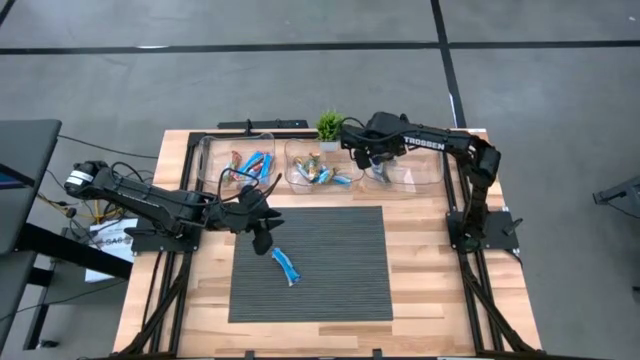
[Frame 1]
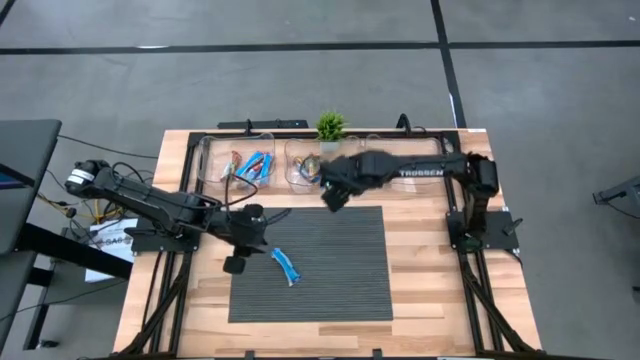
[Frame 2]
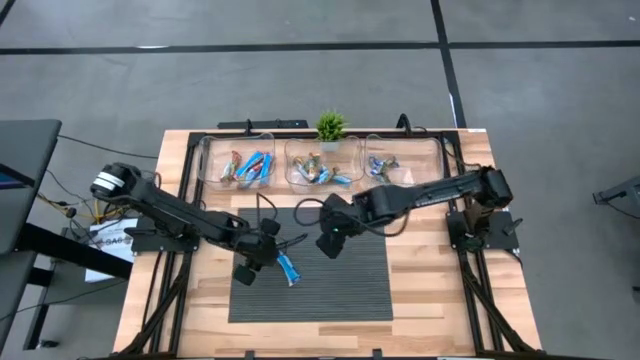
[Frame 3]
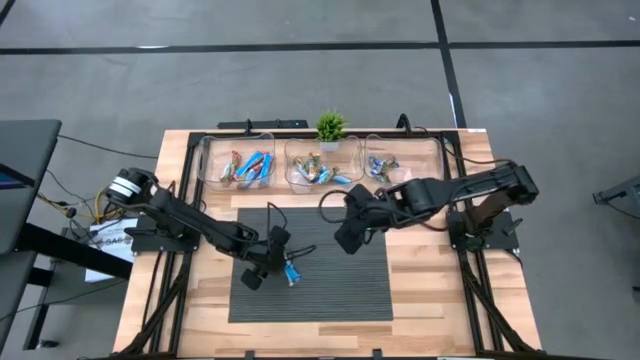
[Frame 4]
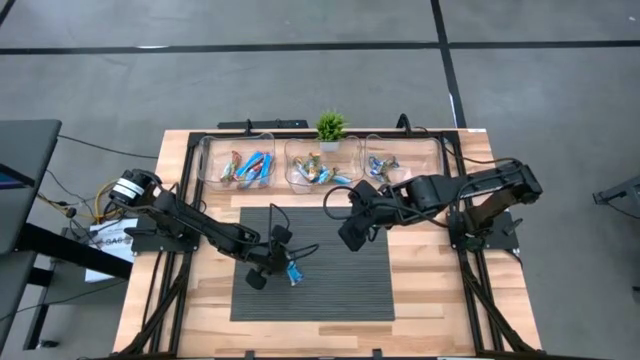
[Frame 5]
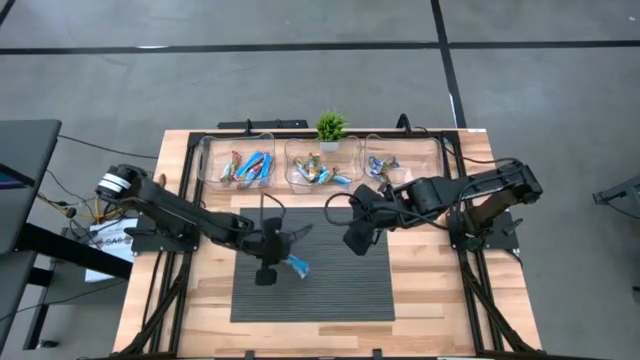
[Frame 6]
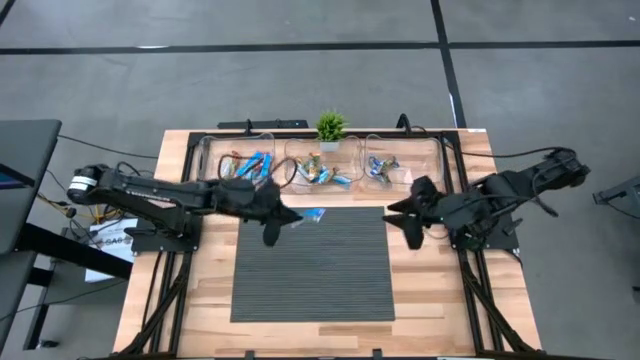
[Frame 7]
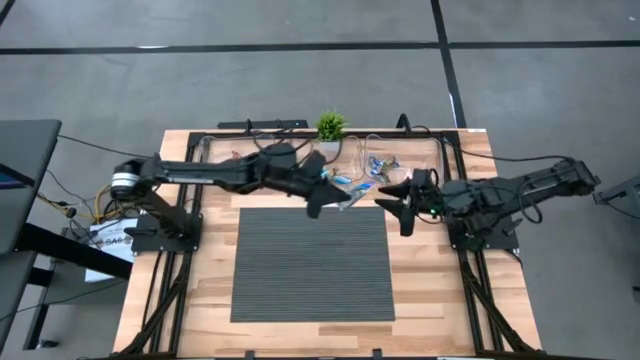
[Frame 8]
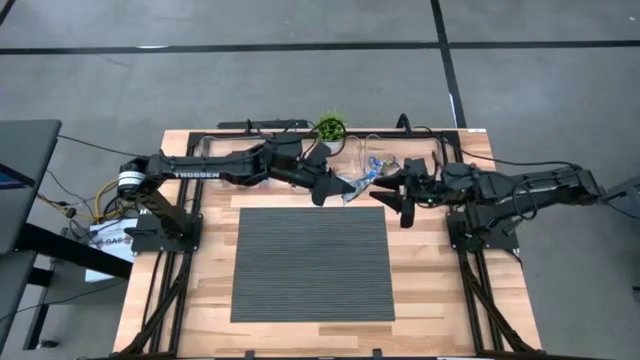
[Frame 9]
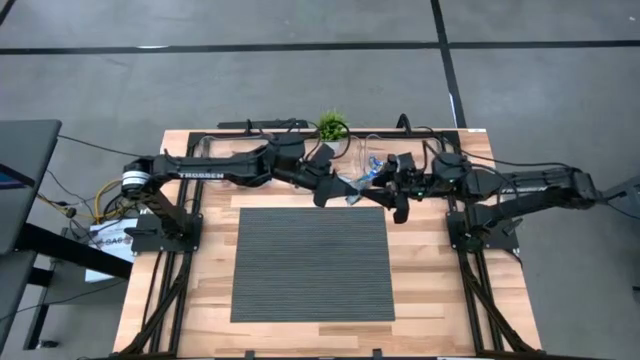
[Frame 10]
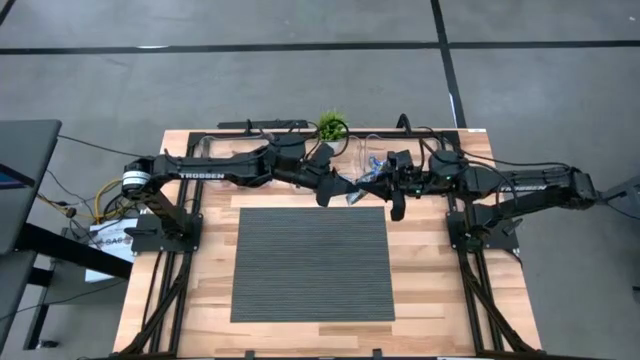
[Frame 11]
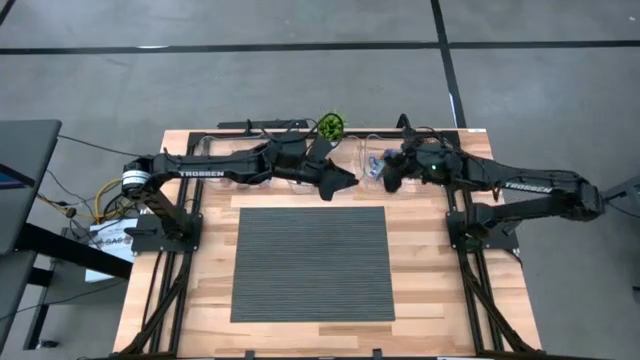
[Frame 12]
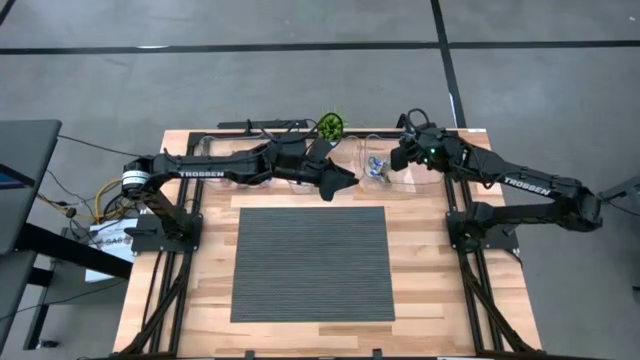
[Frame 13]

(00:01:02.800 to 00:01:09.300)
Task: Pick and place Granola Bars by type
Put the purple granola bar into the top right transparent bin

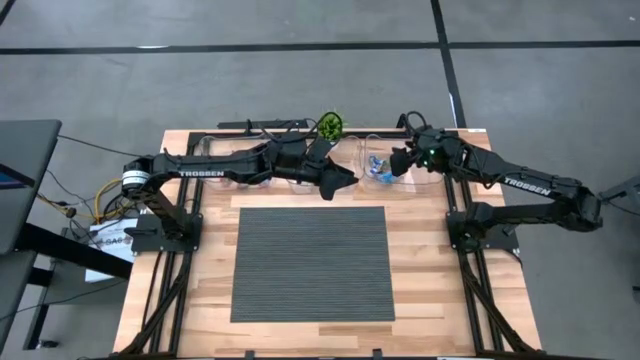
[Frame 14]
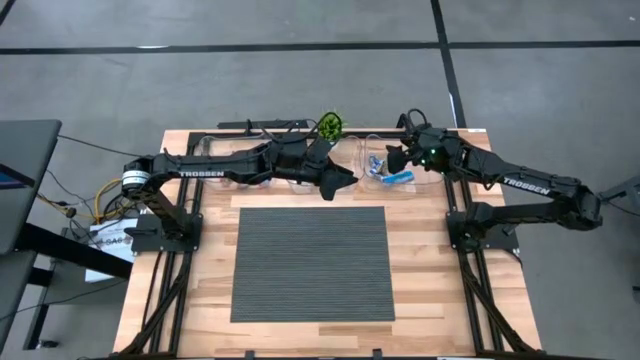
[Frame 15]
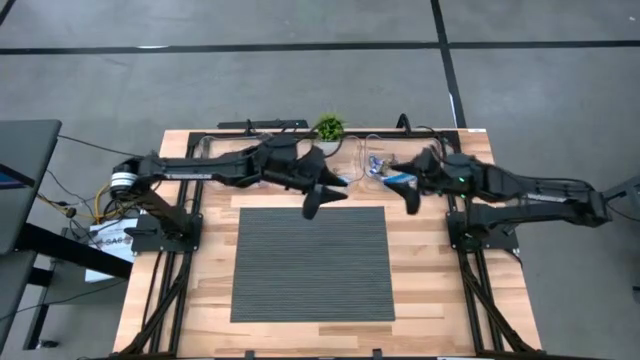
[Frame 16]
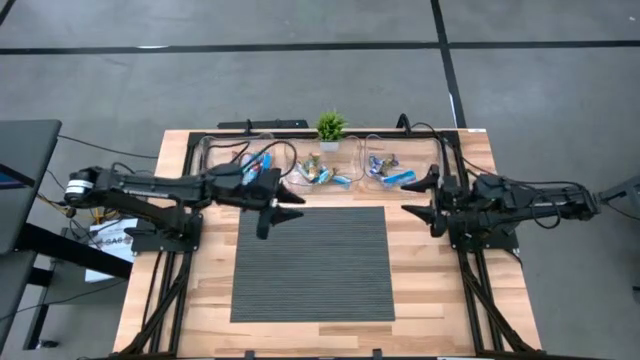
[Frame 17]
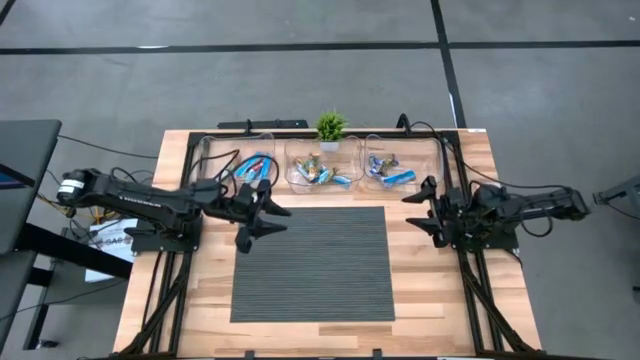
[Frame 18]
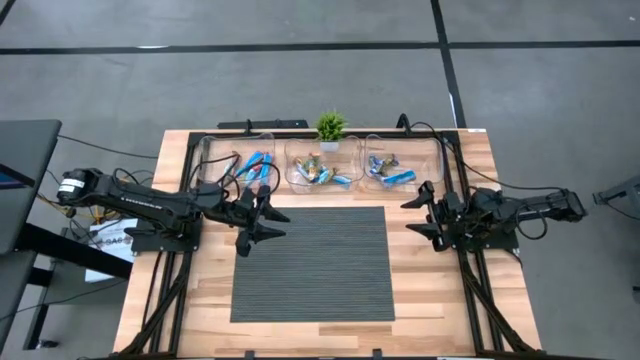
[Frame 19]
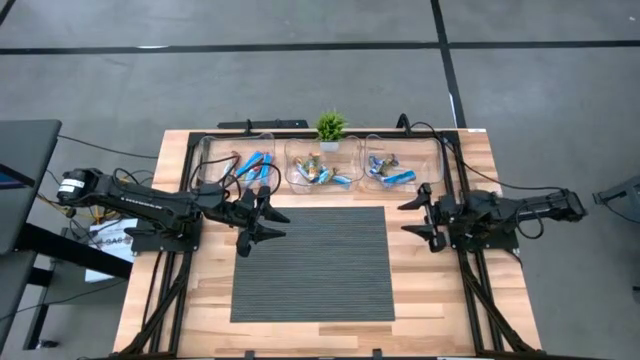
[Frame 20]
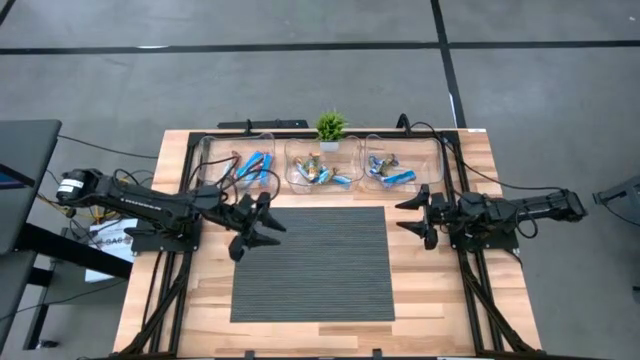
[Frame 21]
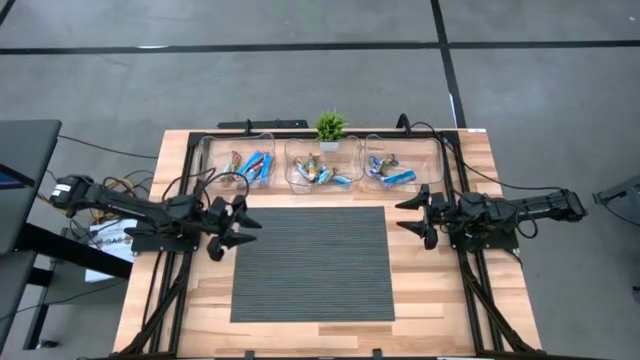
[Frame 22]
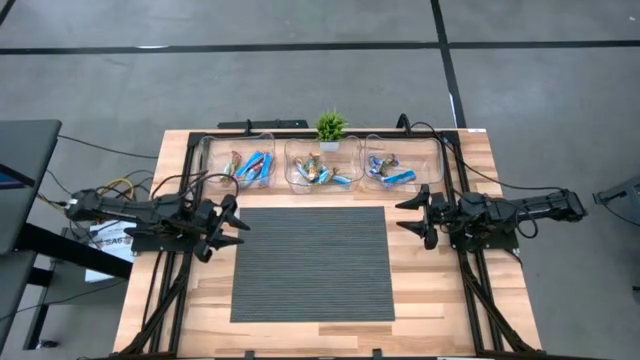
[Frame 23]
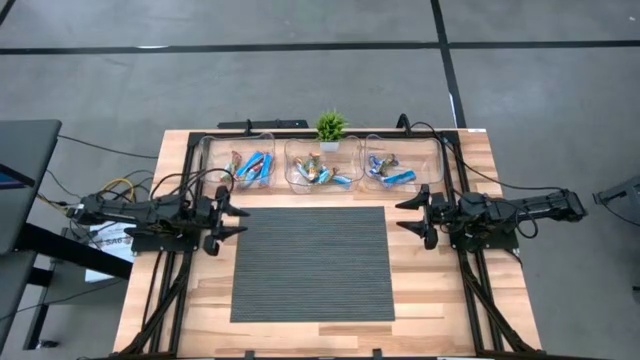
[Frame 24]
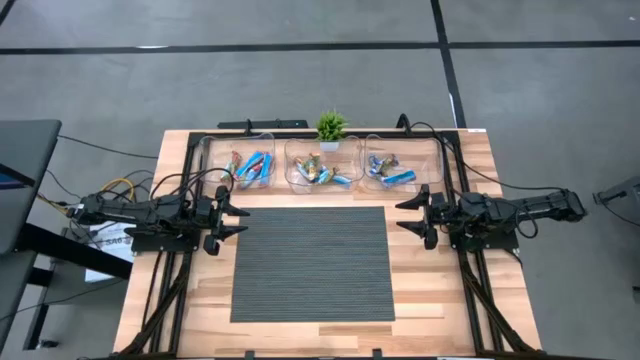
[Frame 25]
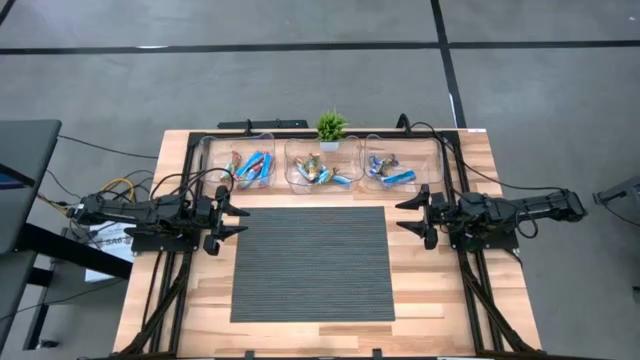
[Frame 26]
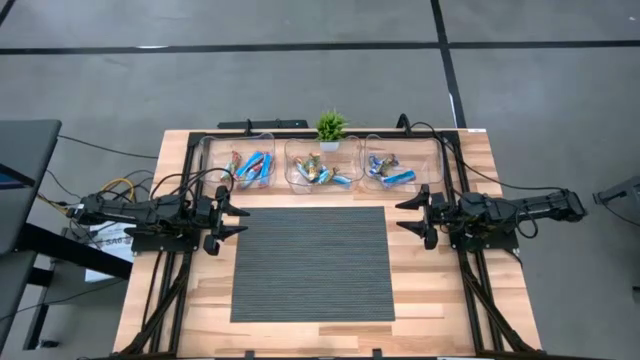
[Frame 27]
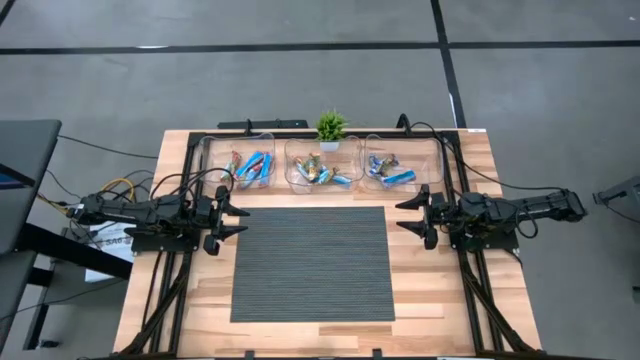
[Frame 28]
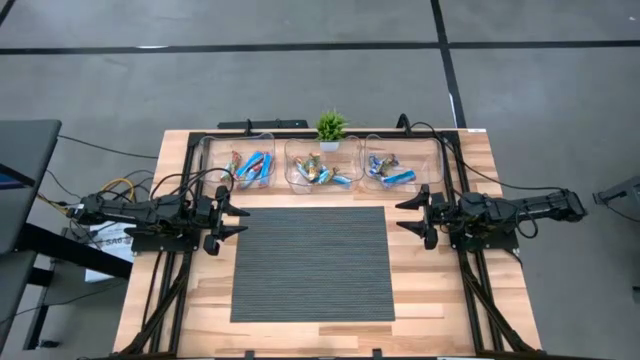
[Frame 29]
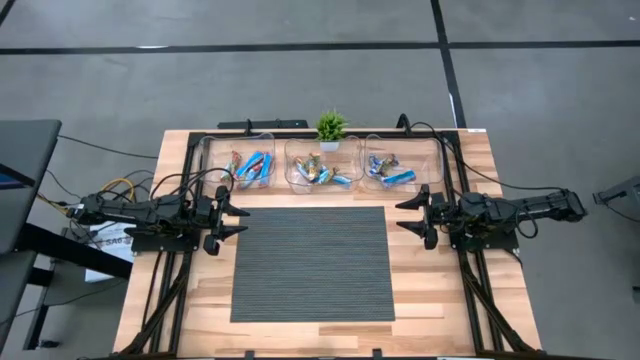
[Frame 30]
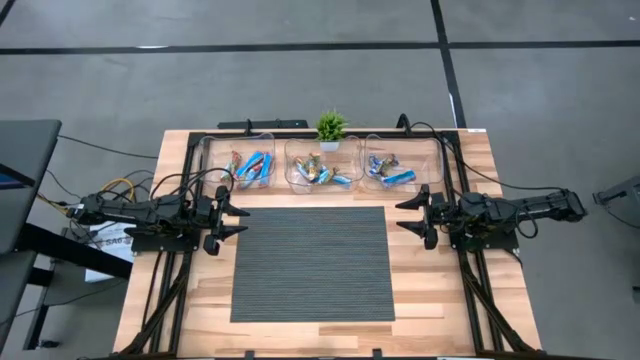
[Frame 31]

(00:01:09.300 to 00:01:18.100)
Return to Home Position

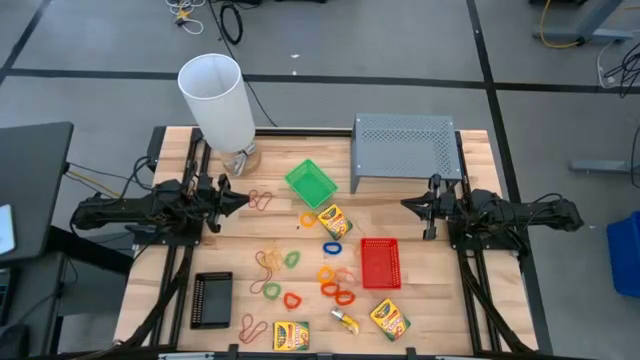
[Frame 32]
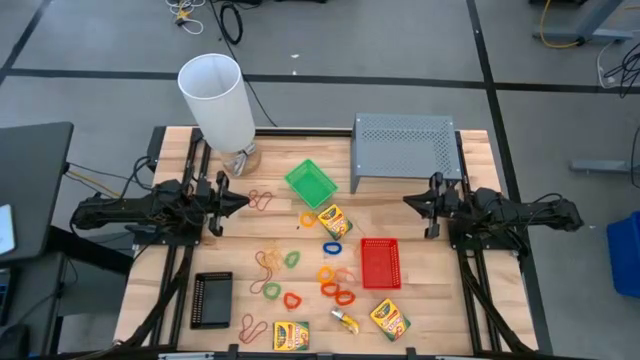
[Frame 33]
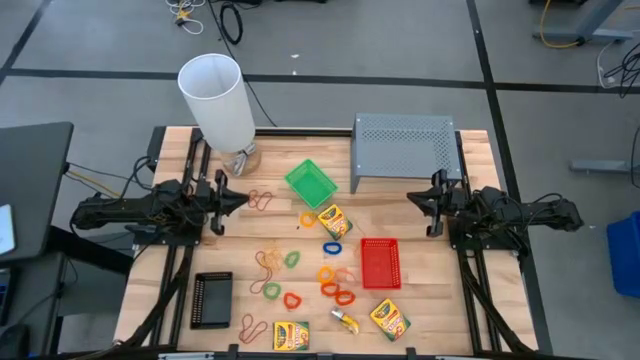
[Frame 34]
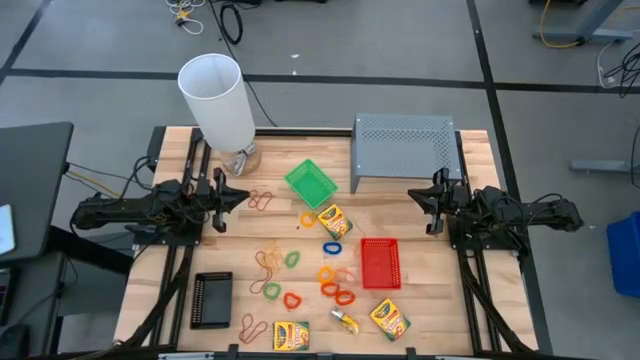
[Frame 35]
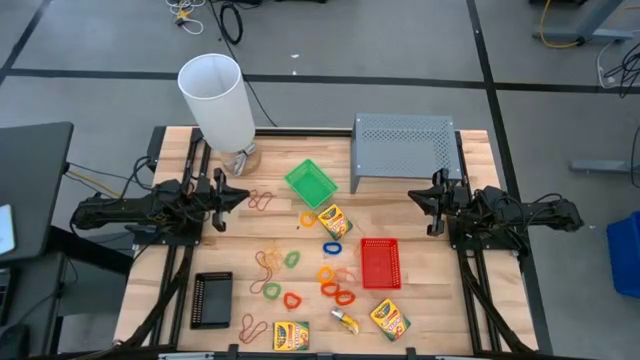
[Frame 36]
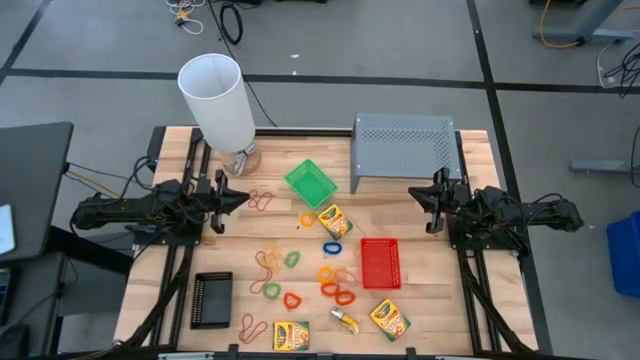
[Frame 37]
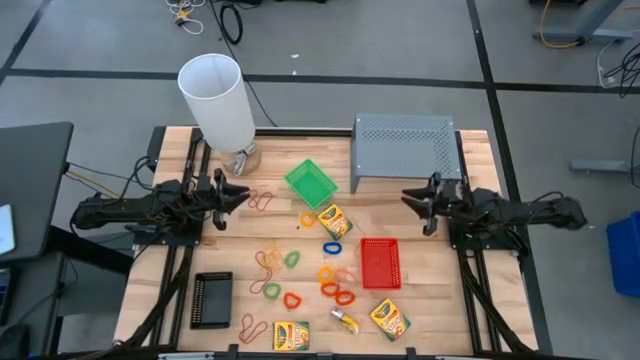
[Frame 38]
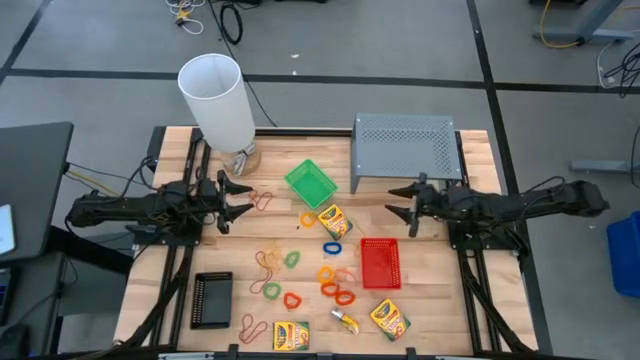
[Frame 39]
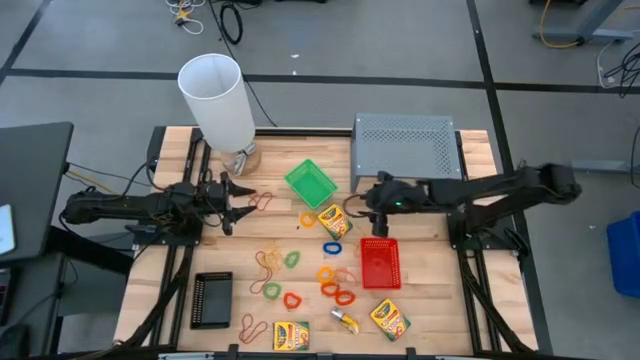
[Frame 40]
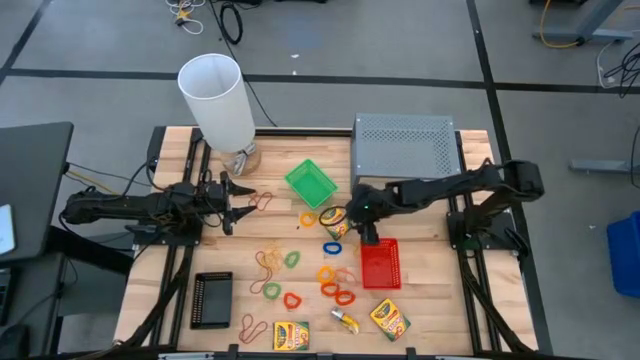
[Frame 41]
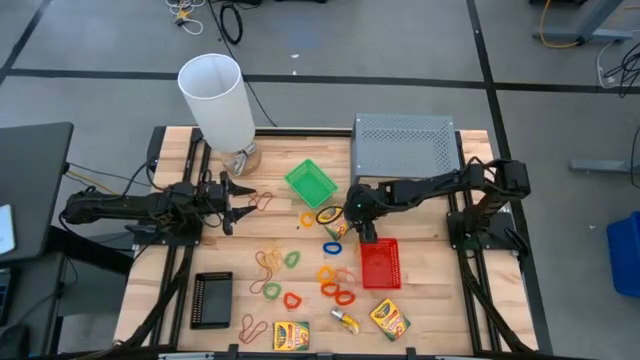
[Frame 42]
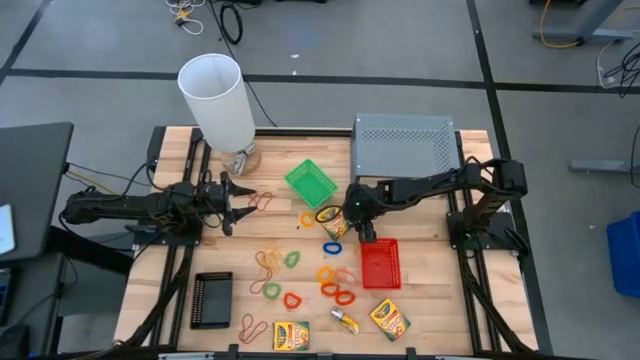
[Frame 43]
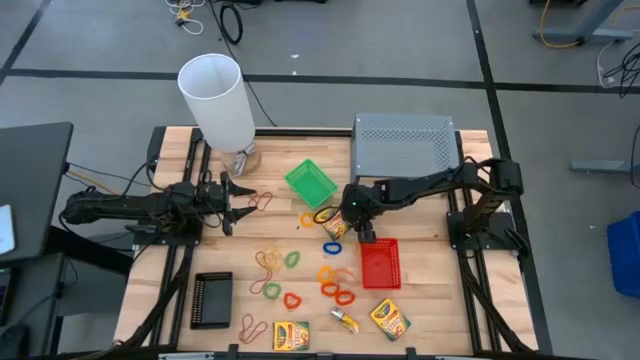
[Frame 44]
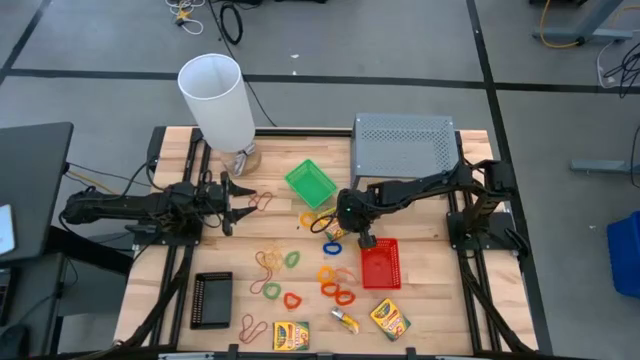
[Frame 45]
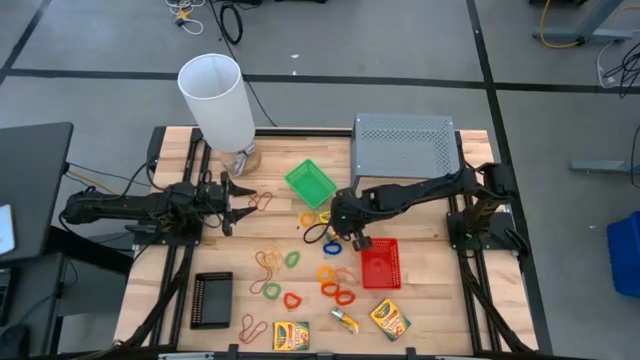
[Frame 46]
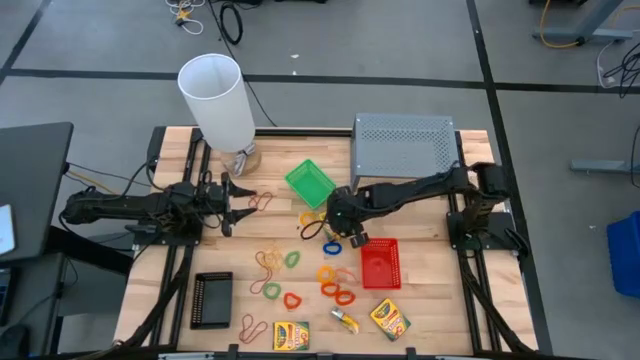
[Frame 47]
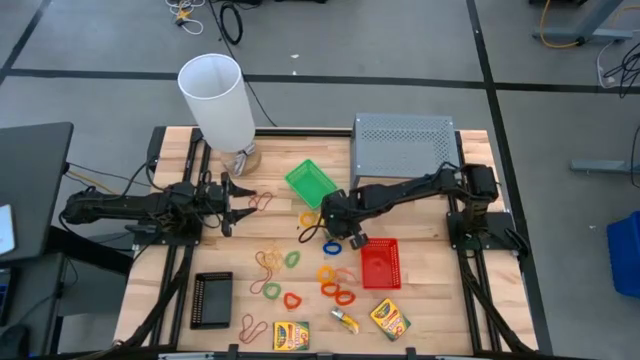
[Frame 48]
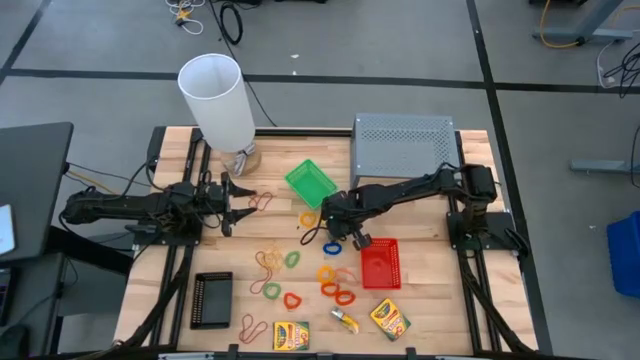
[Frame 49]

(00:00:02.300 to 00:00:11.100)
Task: Pick & Place Office Desk Supplies
Put the yellow rubber band into the green bin
